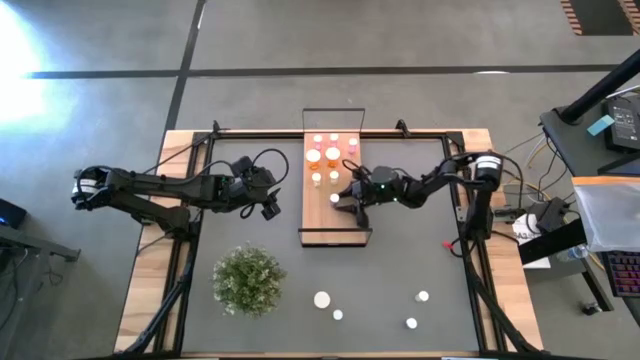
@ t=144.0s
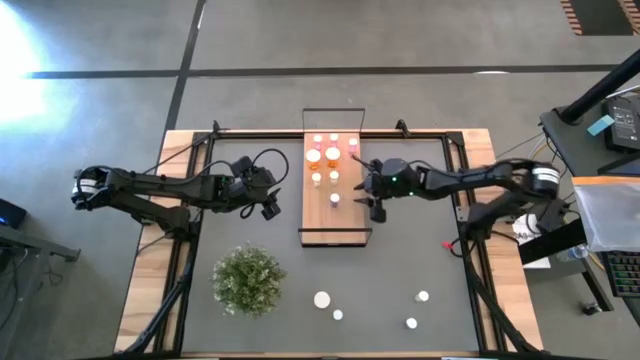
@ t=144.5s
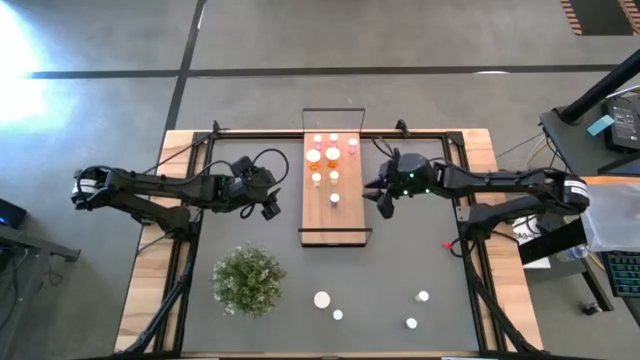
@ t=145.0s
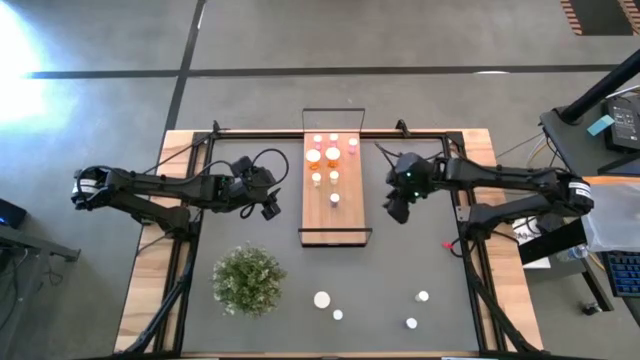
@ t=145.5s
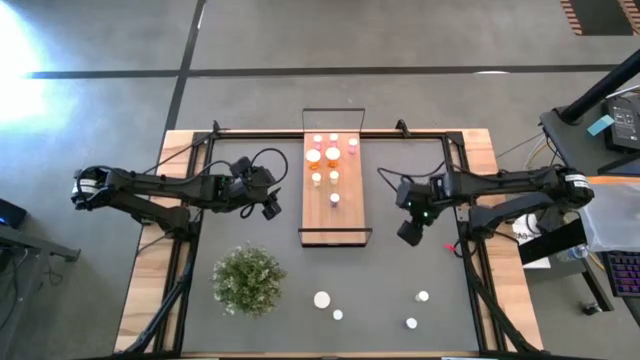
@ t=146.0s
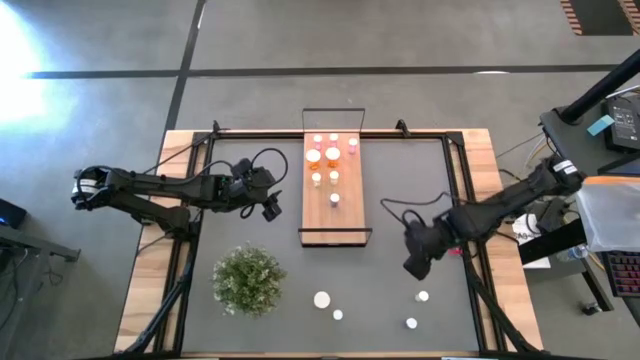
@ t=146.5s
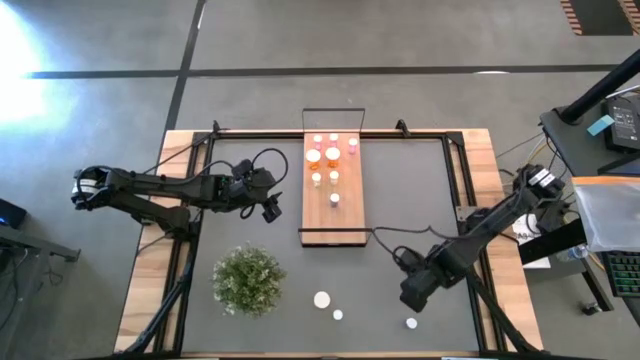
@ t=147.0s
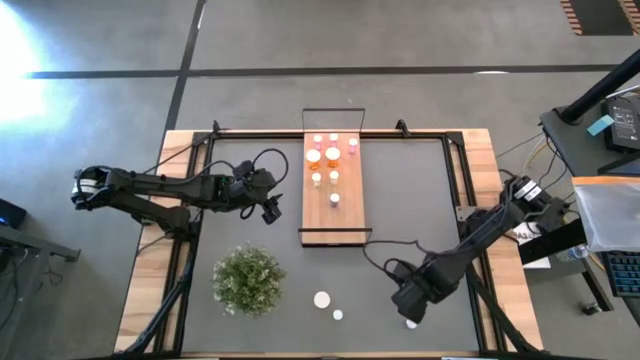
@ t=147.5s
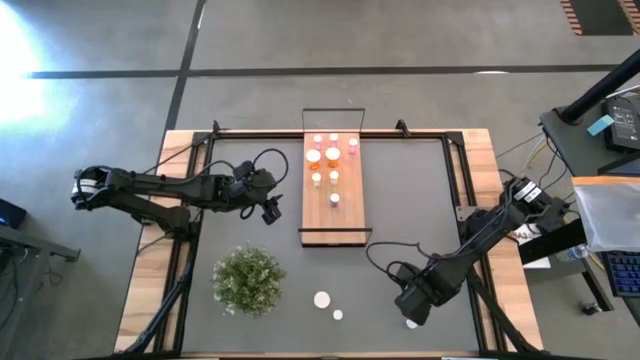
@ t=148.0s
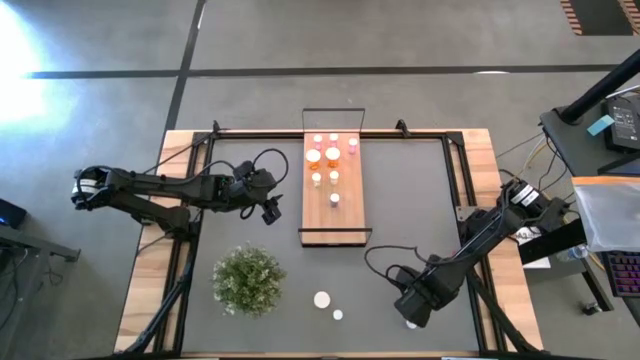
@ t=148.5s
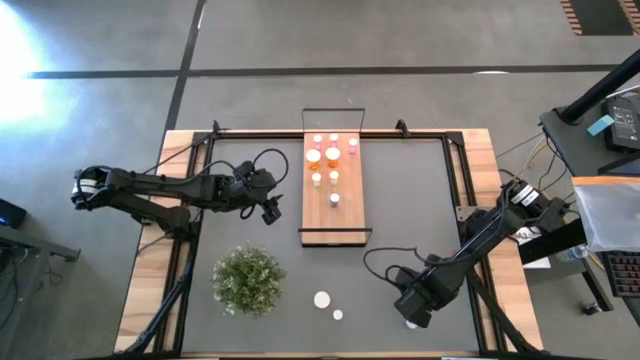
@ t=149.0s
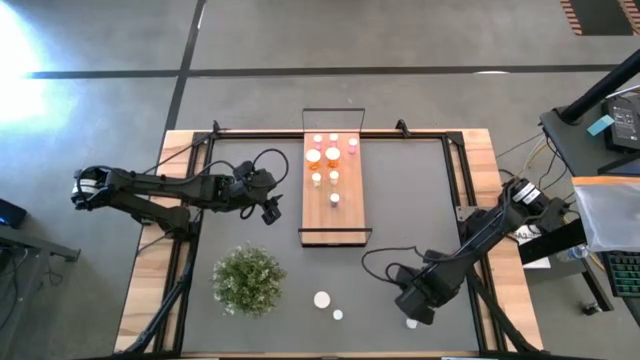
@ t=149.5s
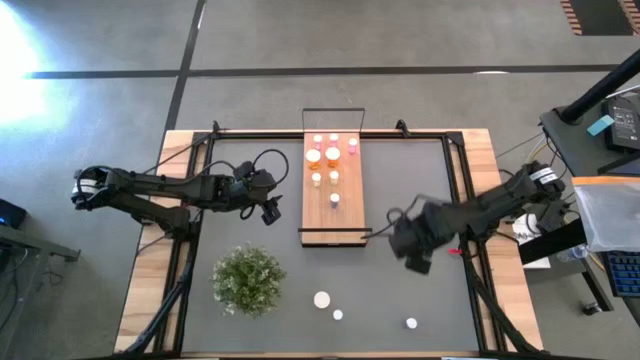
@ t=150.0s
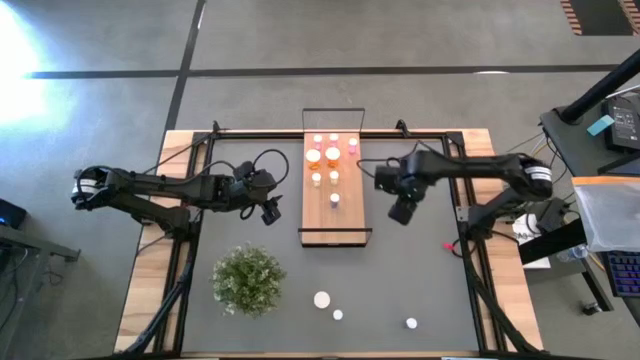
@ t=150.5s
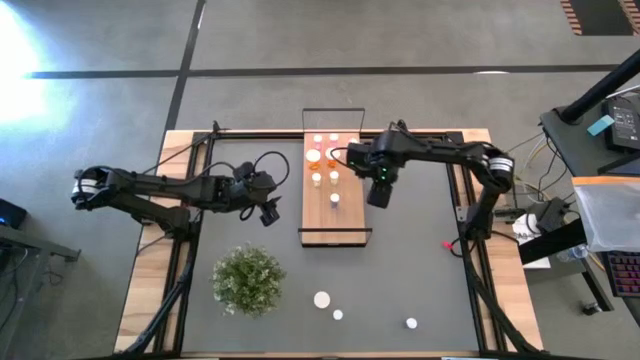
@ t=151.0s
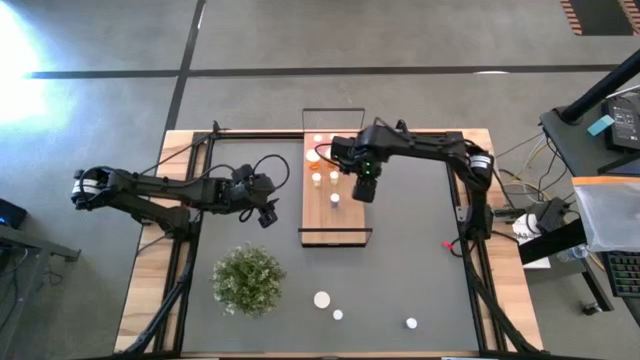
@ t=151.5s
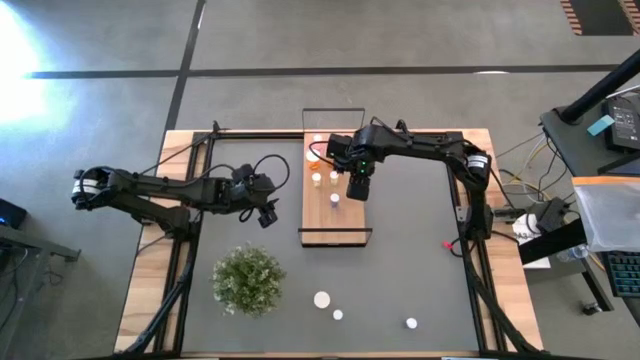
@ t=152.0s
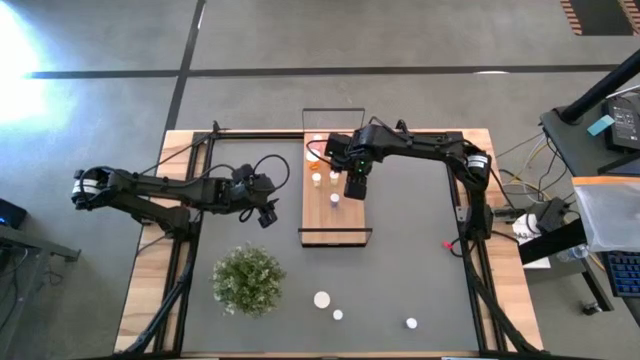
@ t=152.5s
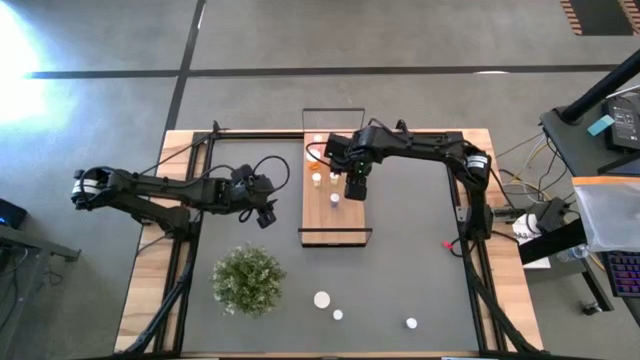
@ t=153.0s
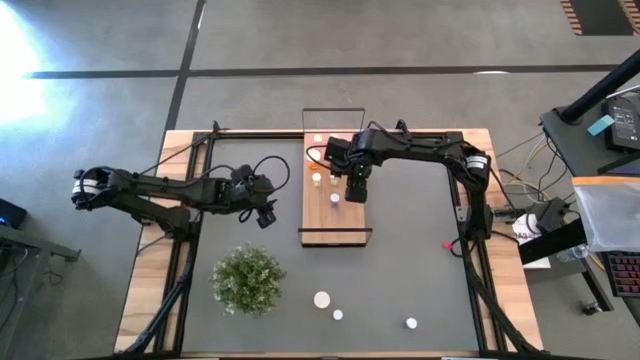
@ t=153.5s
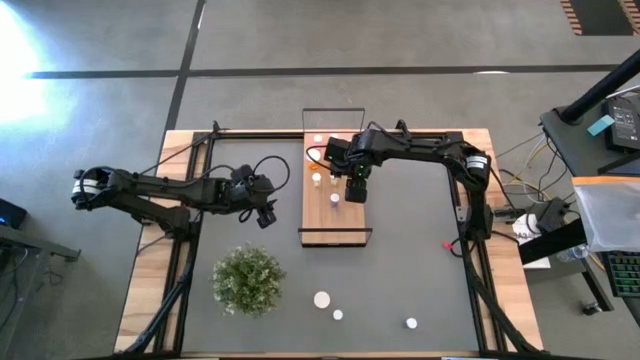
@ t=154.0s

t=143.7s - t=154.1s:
Task: Pick and place medicine bottles onto shelf by color
Put the yellow pill bottle on the shelf aligned with the other yellow pill bottles

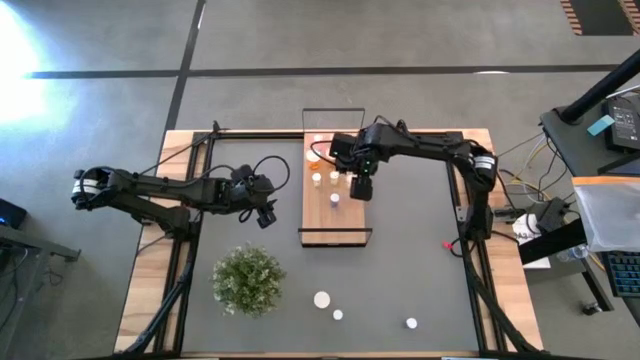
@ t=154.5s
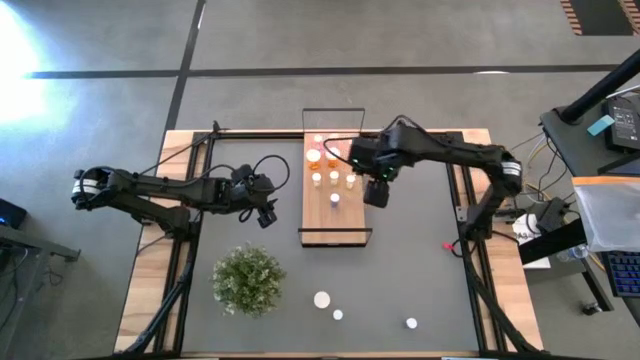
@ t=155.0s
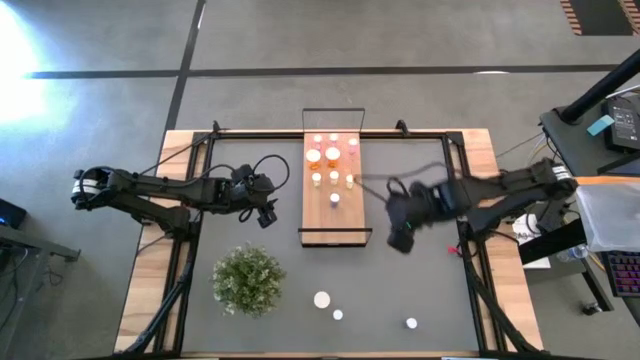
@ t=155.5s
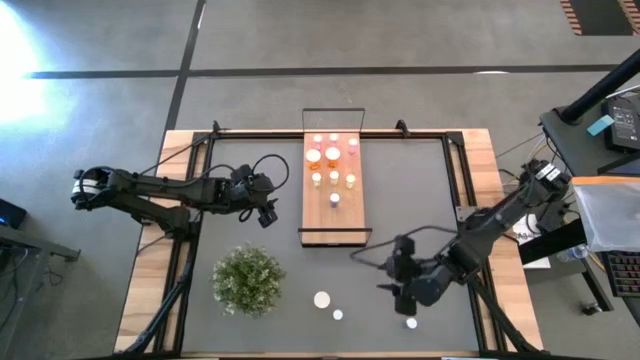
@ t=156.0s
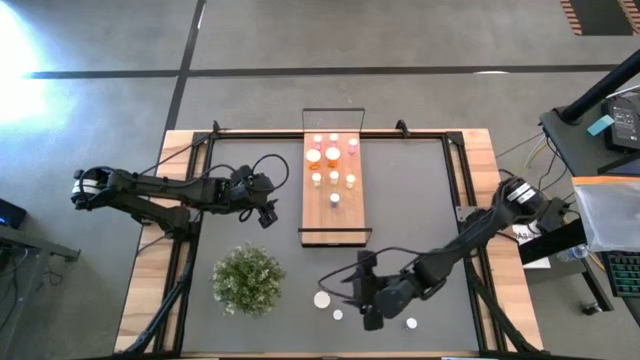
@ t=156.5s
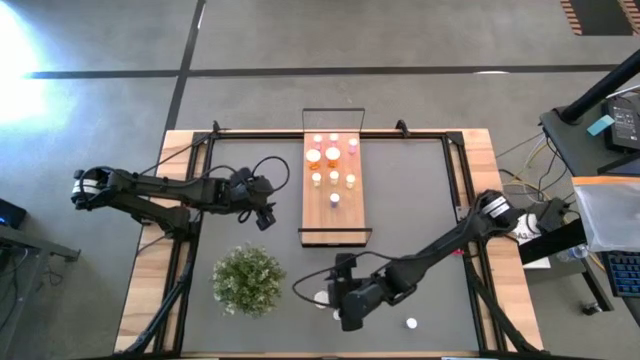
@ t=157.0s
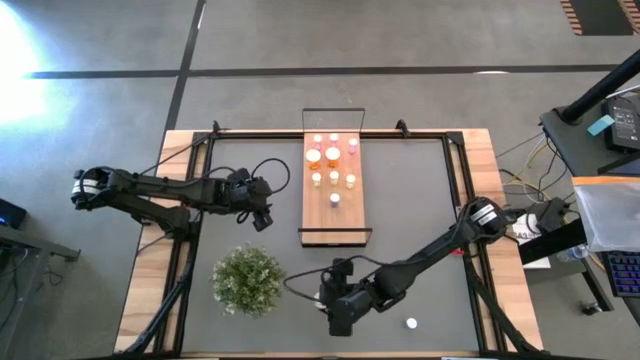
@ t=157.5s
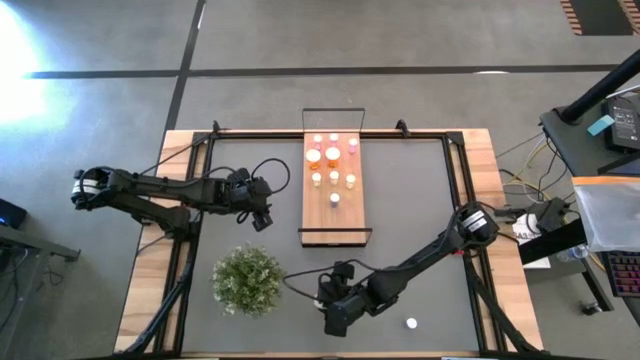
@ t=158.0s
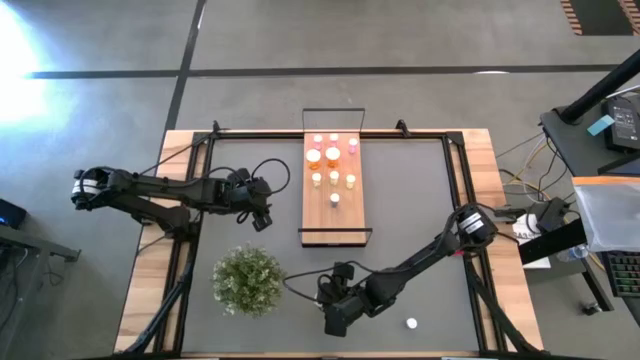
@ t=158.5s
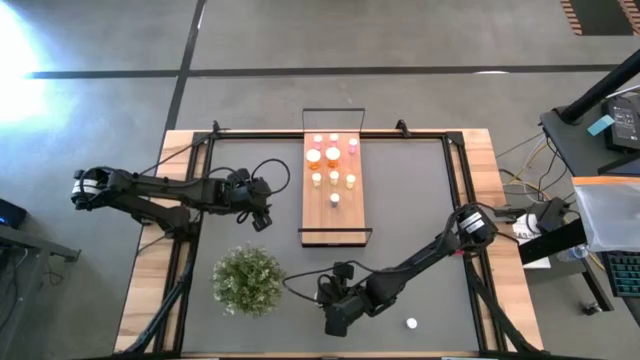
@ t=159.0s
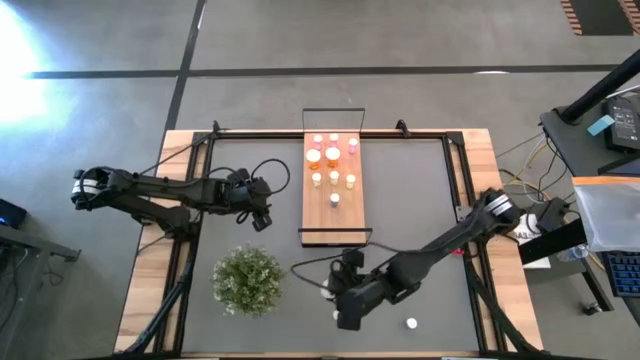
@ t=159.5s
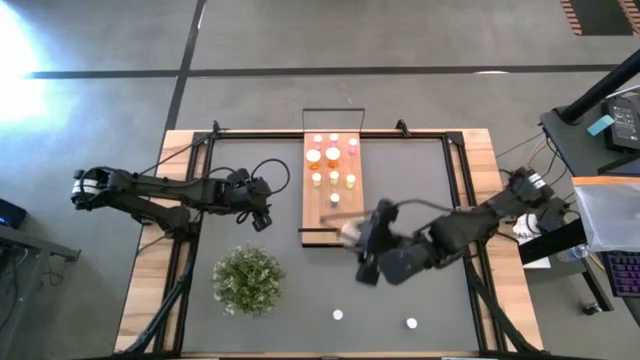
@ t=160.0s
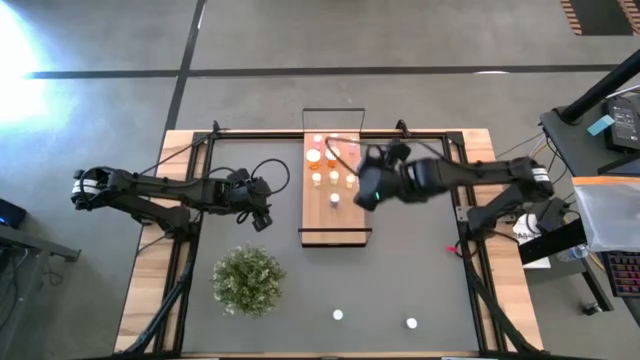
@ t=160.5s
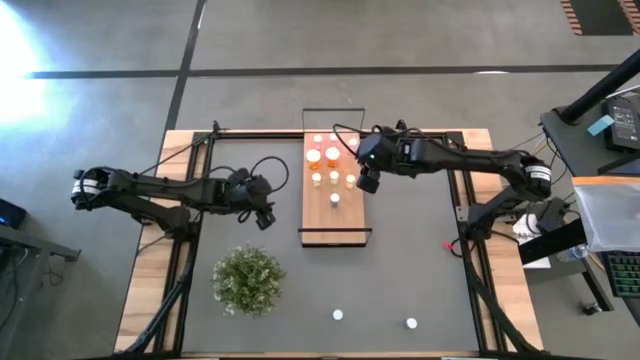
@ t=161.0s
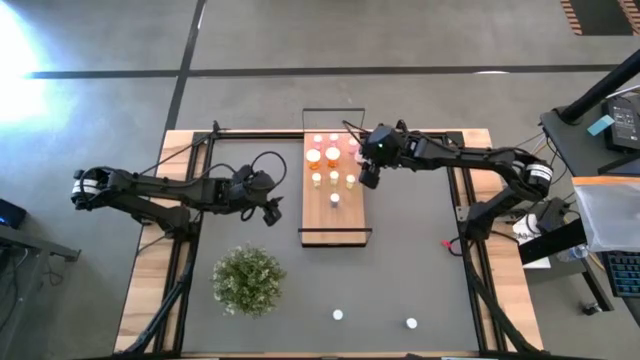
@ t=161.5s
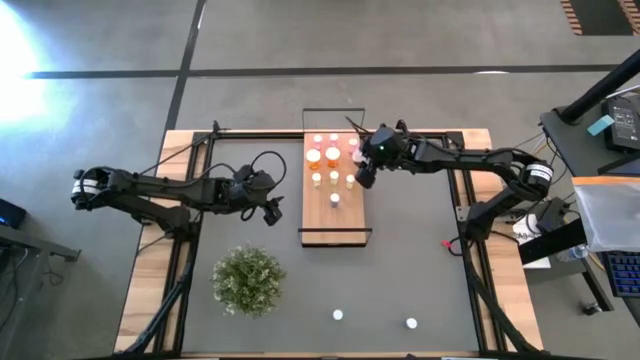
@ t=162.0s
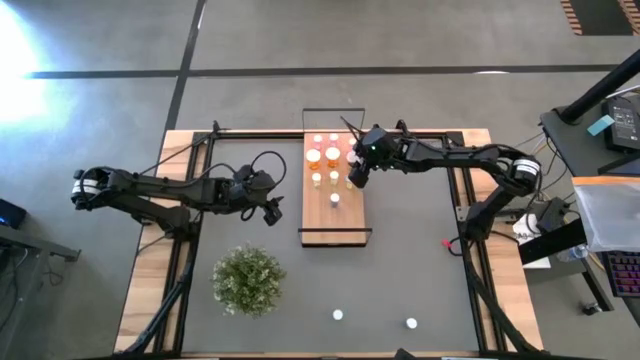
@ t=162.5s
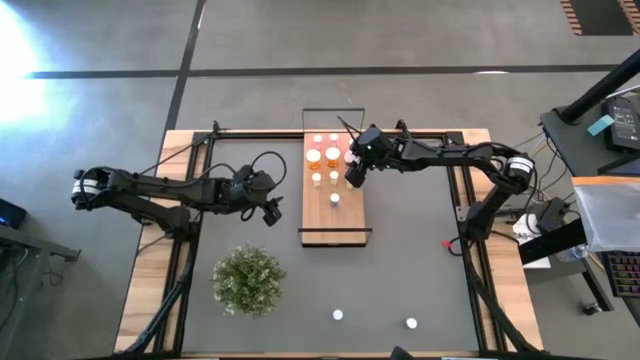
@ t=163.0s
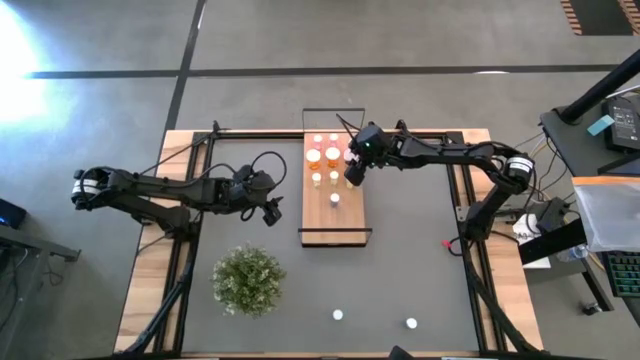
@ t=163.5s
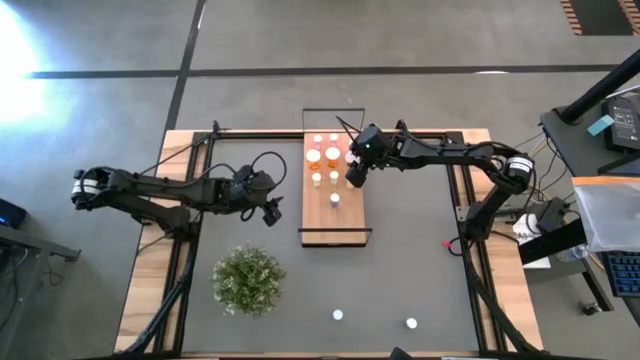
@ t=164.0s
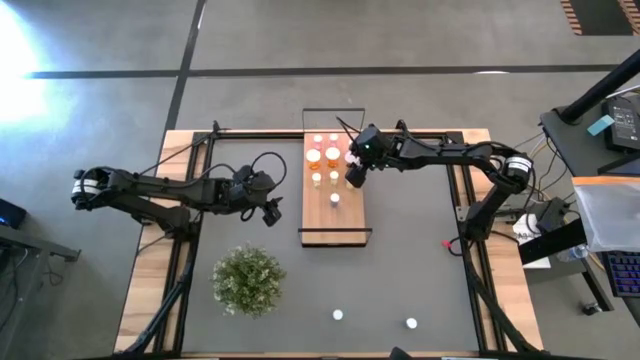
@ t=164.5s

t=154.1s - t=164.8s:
Put the orange pill bottle on the shelf aligned with the other orange pill bottles
